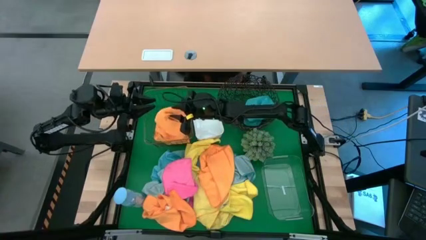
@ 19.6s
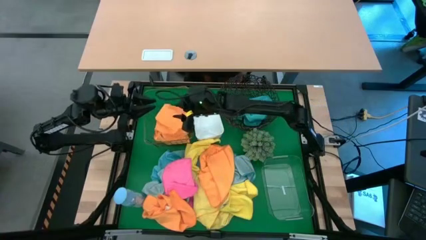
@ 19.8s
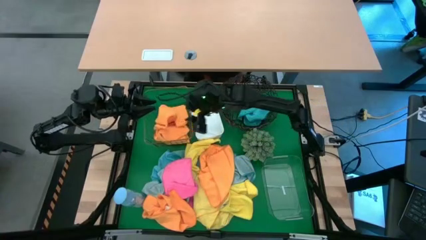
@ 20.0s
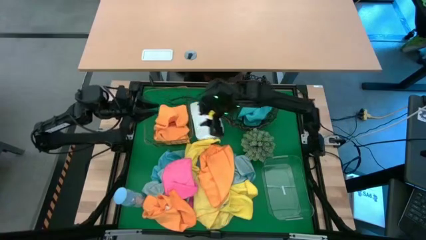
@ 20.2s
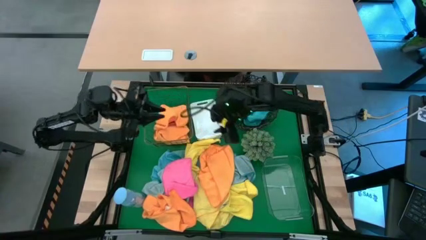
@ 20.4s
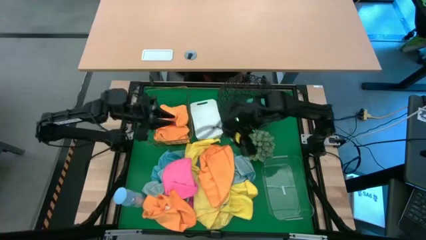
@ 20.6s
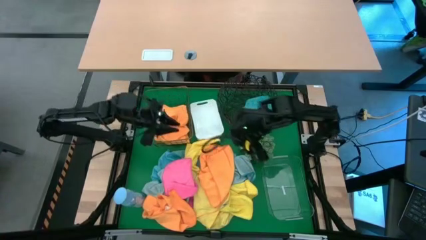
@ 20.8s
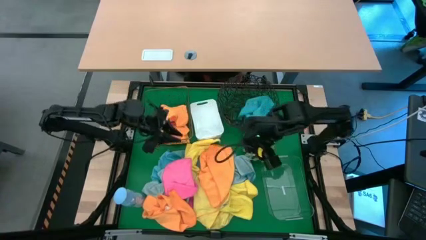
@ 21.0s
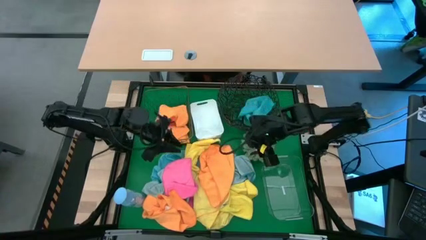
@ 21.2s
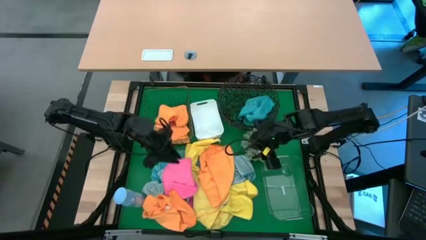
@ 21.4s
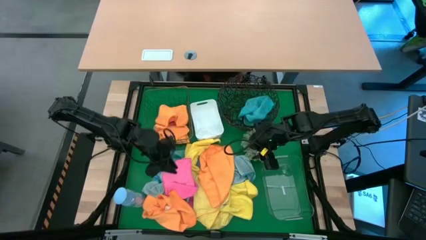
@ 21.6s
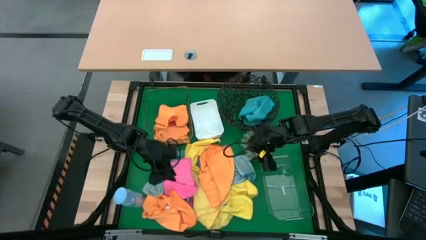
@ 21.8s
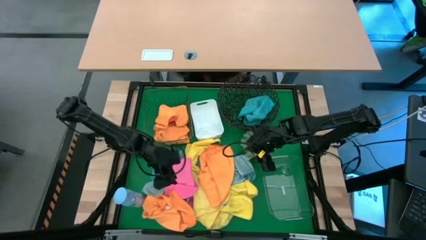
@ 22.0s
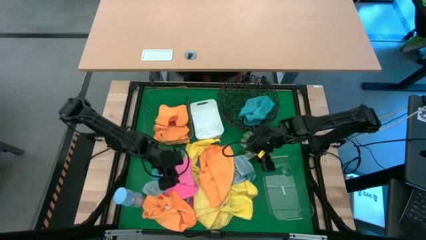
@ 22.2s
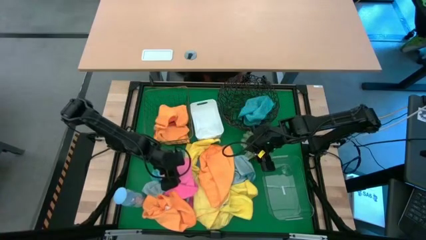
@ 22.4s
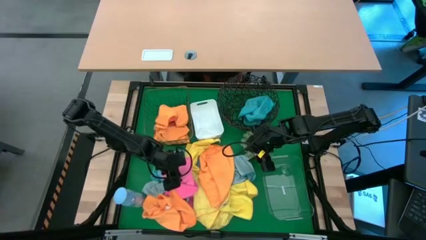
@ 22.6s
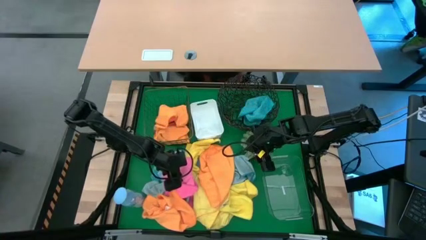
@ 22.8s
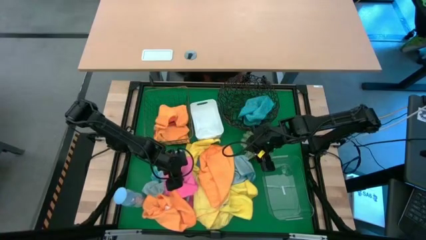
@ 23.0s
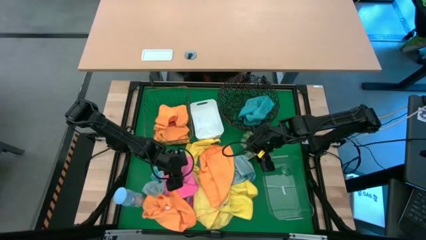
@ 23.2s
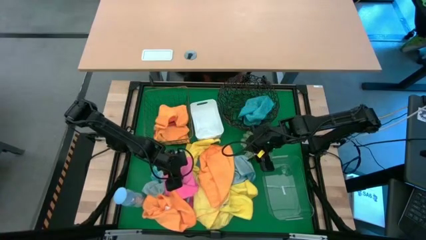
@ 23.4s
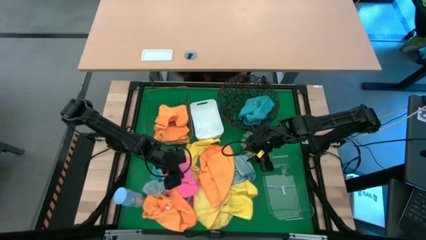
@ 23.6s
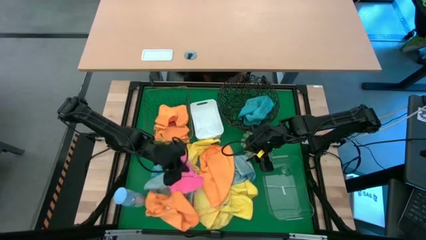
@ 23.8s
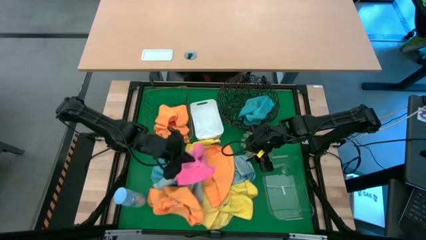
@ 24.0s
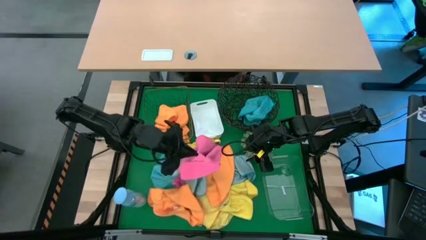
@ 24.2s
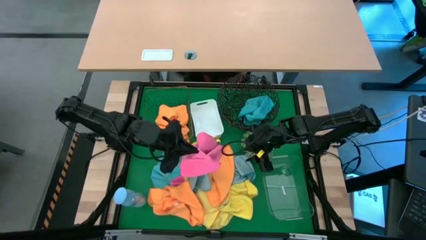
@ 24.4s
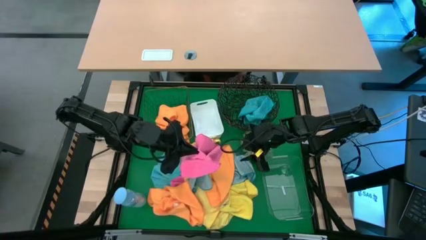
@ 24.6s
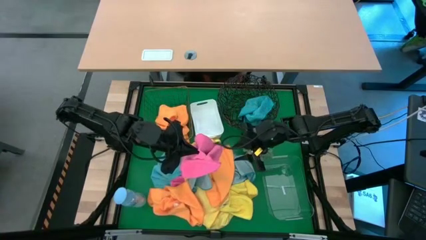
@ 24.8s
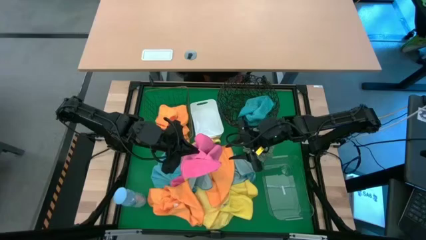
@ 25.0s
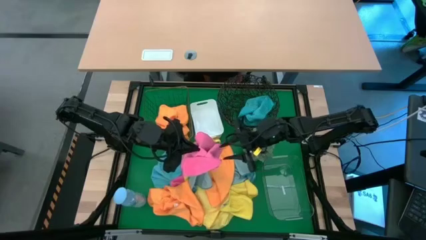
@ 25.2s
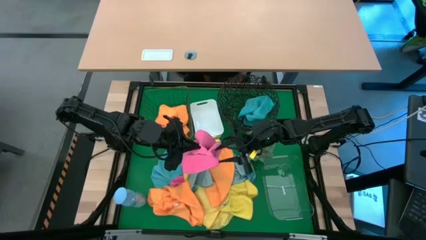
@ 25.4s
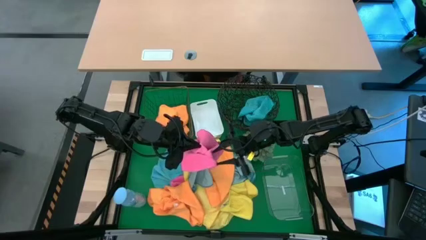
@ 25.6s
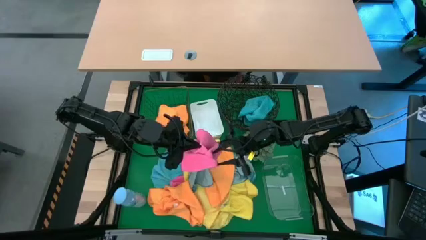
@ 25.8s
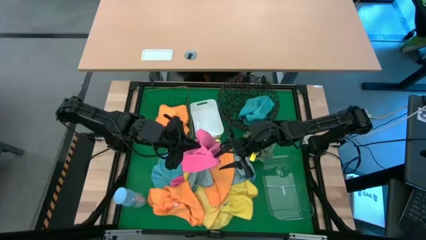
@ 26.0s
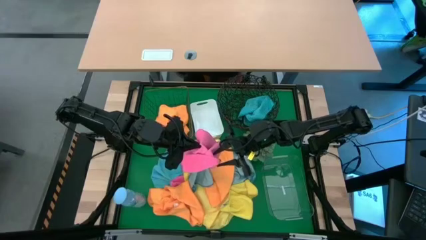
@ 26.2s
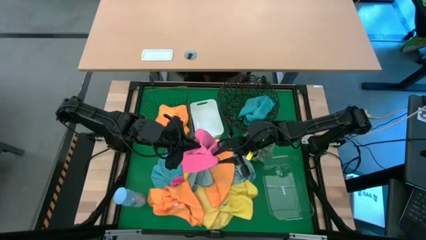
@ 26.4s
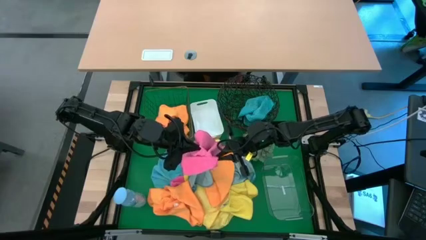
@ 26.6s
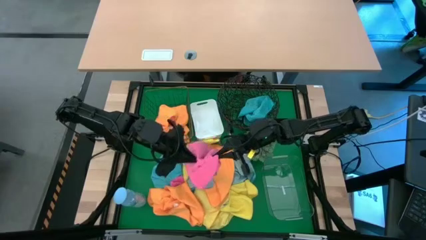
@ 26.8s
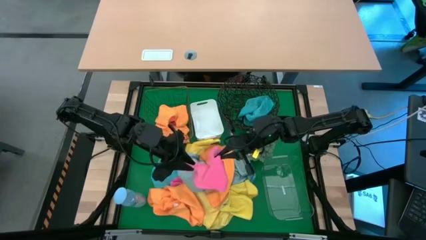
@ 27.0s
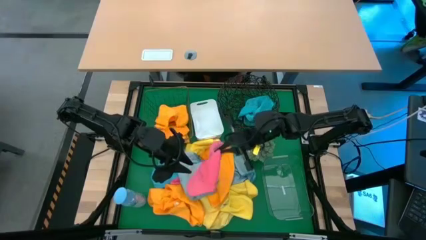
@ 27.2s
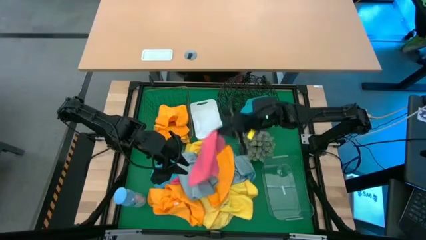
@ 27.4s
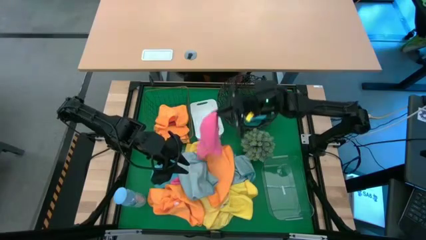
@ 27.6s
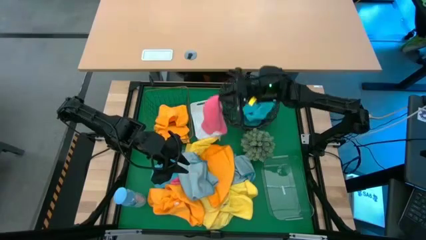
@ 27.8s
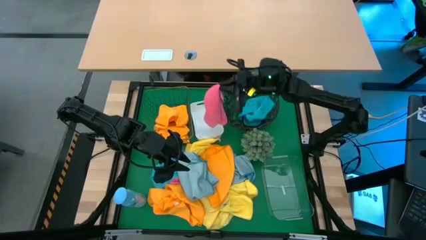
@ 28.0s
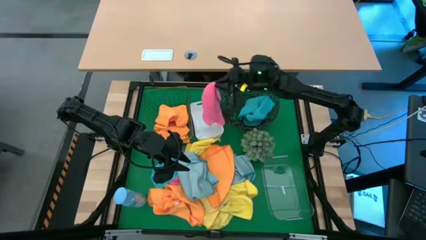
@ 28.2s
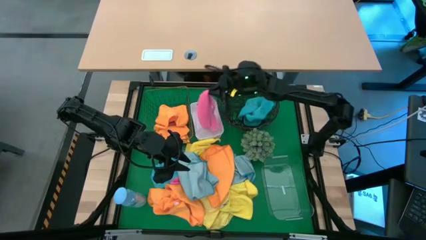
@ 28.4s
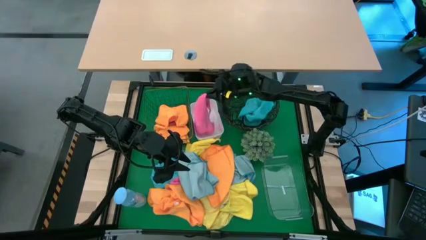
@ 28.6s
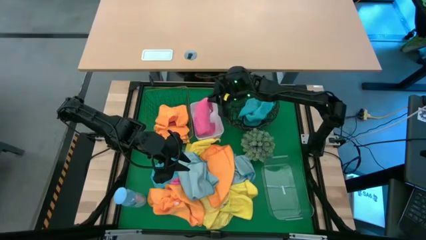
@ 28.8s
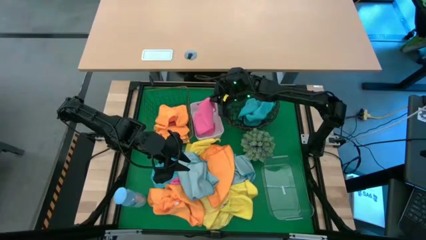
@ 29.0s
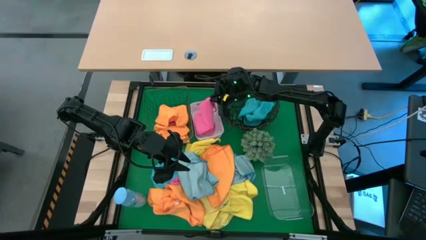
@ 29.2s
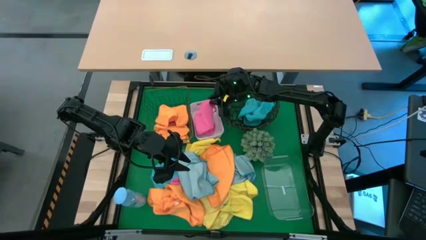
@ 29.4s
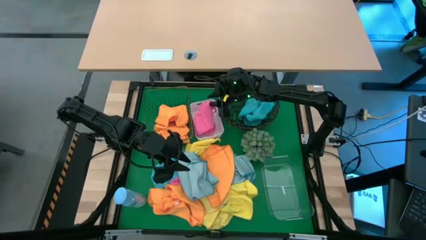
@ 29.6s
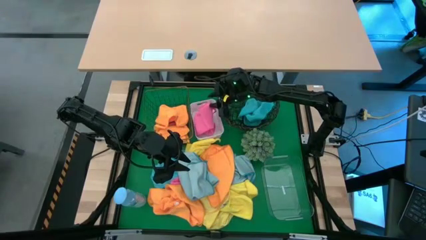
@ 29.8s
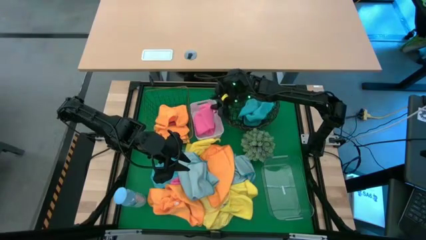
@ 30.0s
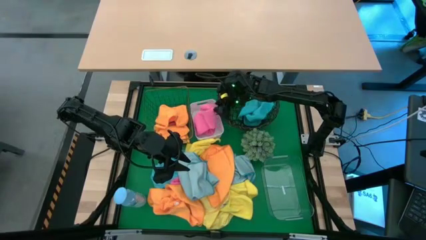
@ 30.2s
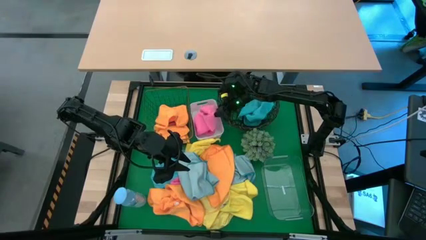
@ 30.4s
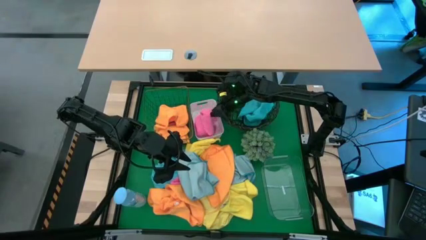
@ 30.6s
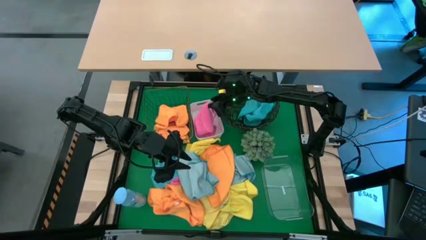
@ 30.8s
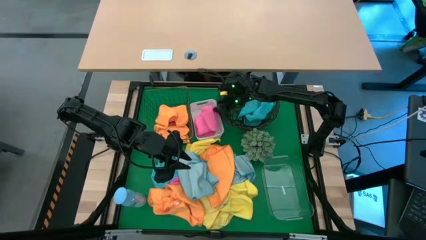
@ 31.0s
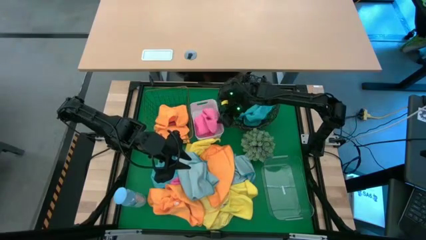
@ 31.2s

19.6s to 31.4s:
Task: Sort microfiber towel by color & place in baskets
Put the pink microfiber towel into the white bin

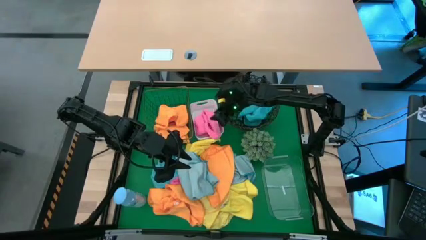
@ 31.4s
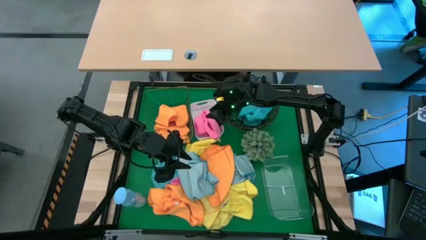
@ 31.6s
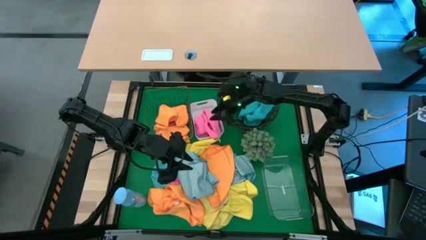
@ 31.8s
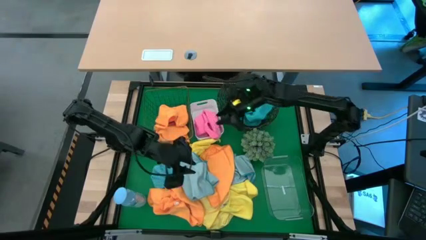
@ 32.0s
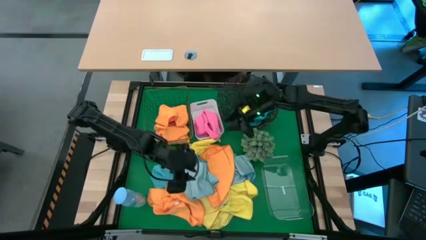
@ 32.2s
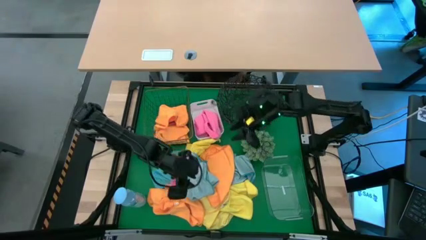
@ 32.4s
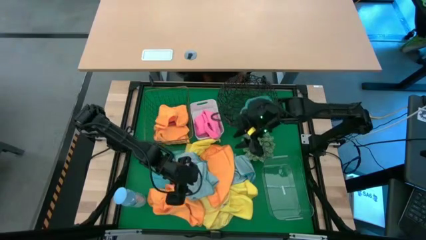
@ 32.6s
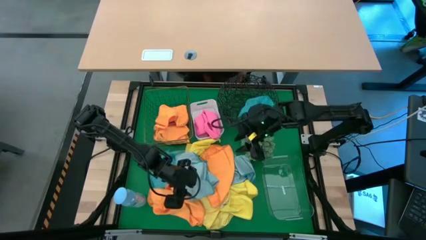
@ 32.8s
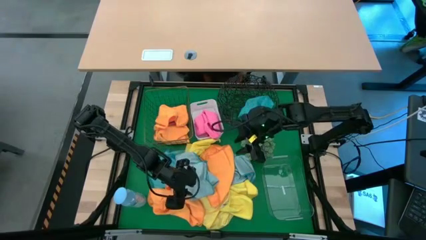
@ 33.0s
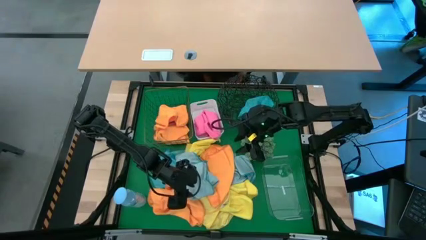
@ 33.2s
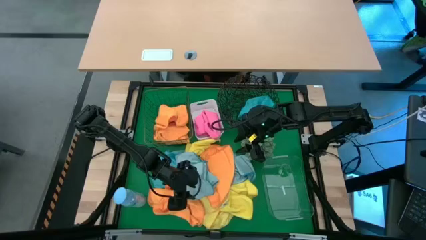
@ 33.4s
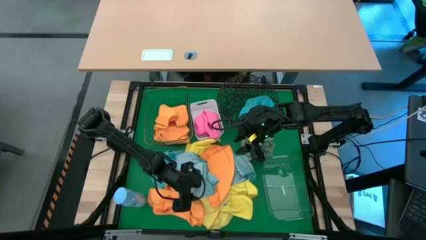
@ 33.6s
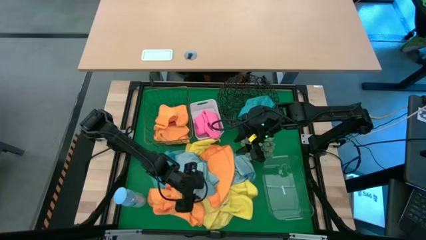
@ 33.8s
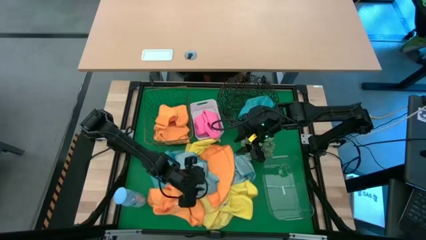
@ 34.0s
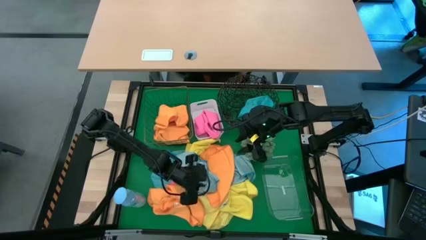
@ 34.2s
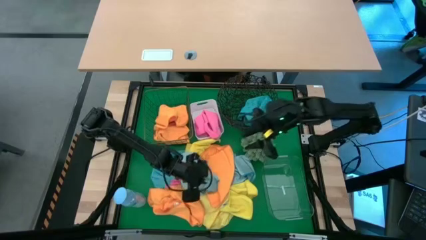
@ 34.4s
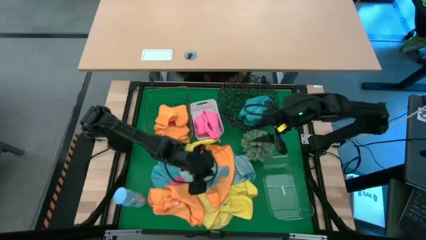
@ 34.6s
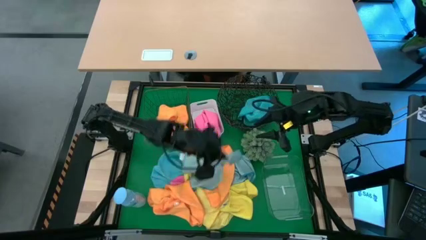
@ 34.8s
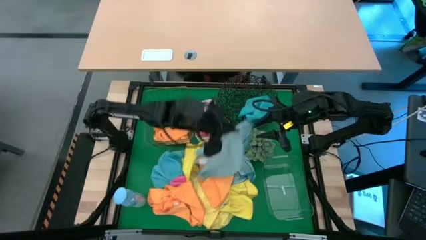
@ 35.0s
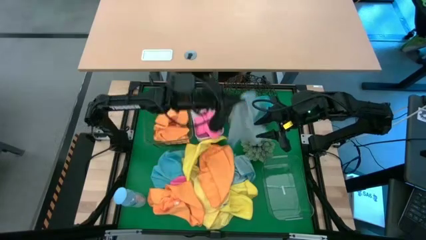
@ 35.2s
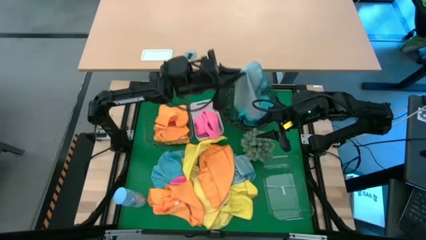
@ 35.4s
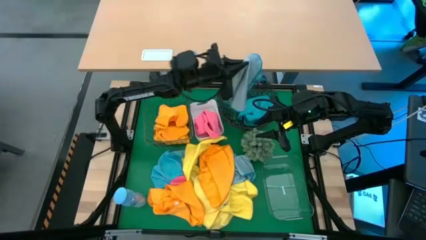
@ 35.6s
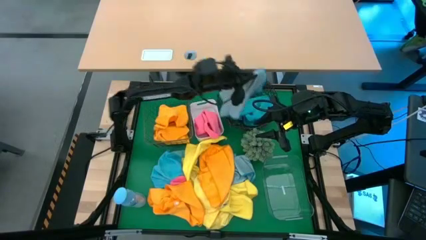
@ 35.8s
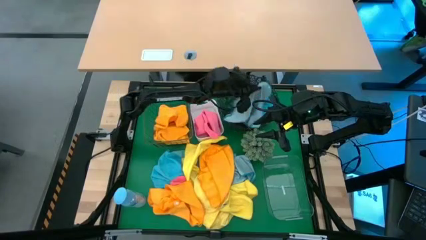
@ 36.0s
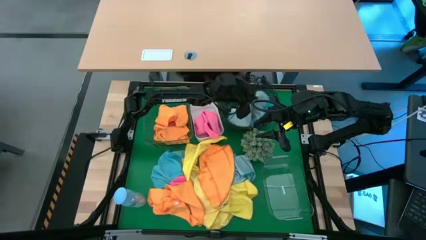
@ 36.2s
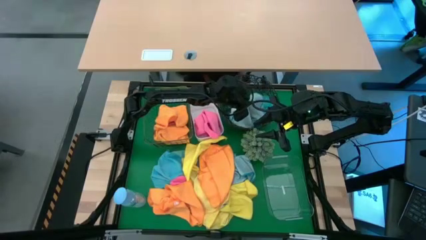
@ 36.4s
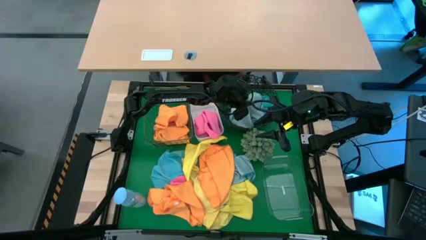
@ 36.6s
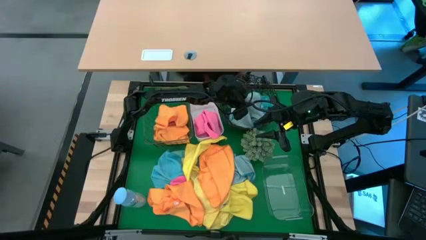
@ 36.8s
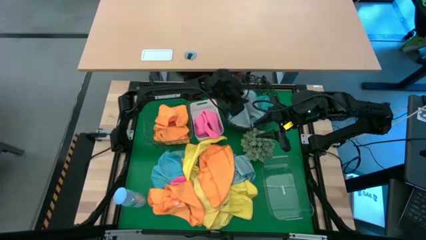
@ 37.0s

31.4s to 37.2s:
Put the light blue microfiber towel into the black basket
